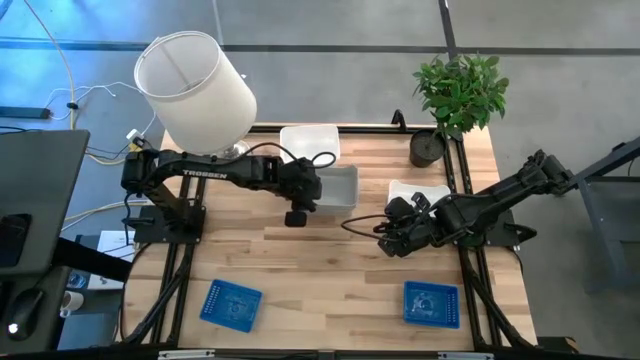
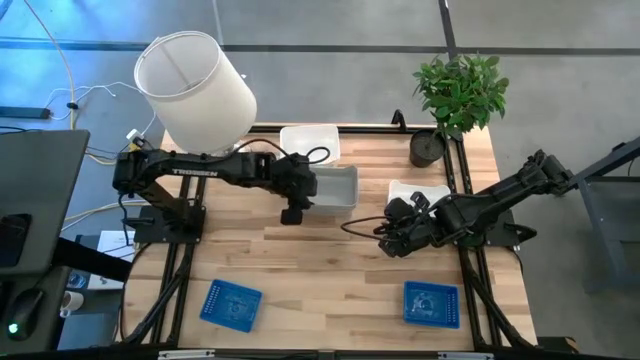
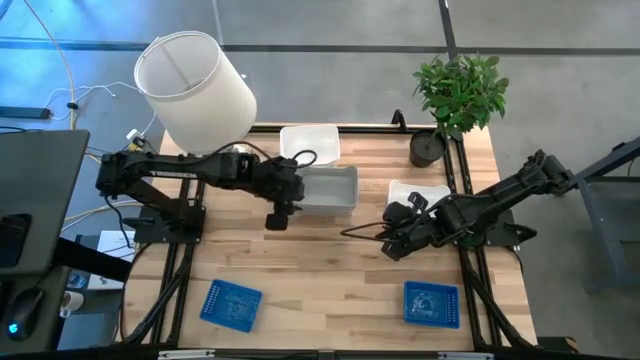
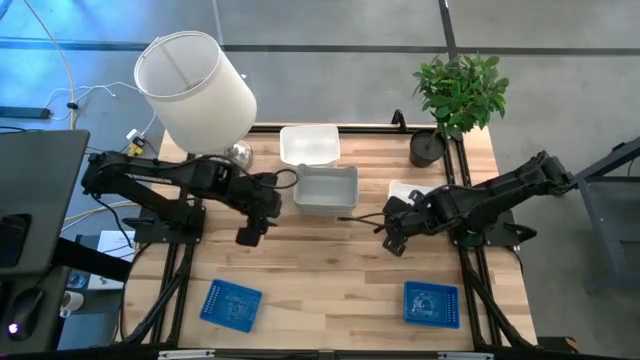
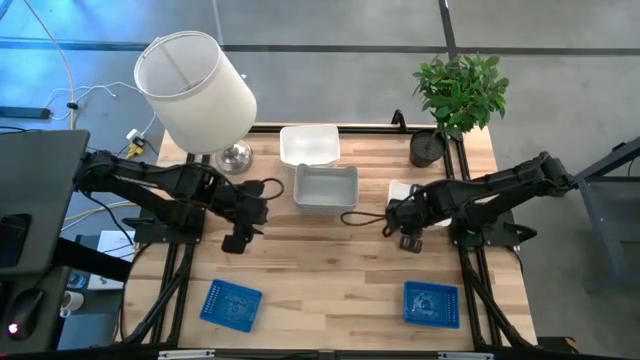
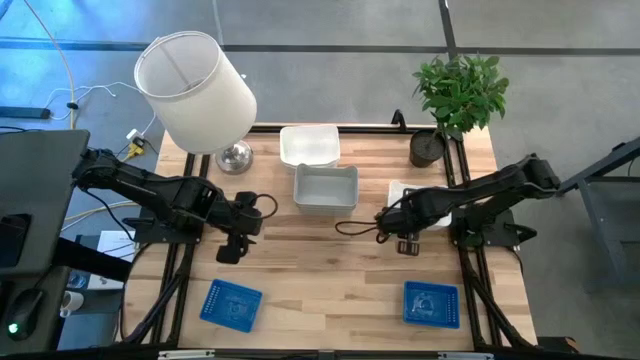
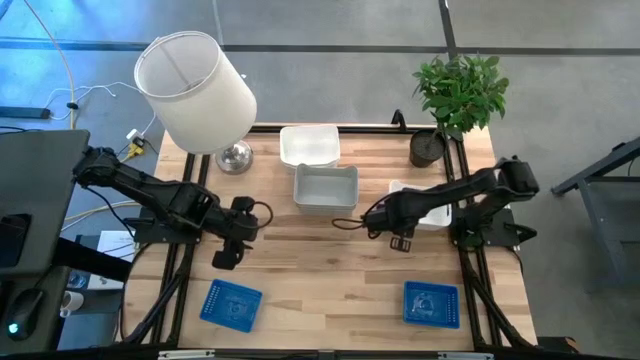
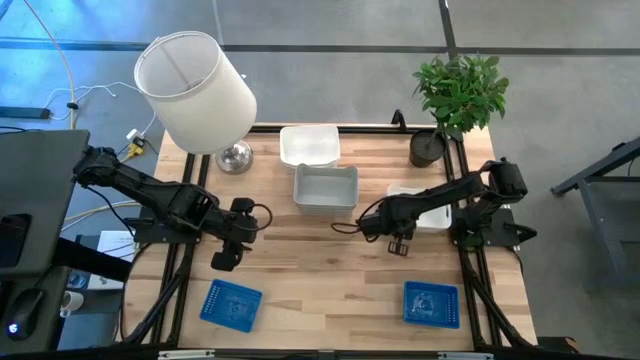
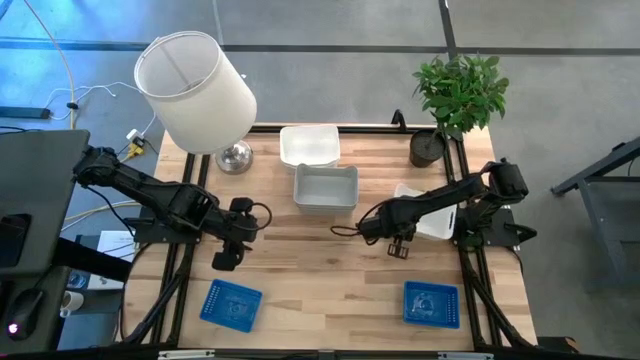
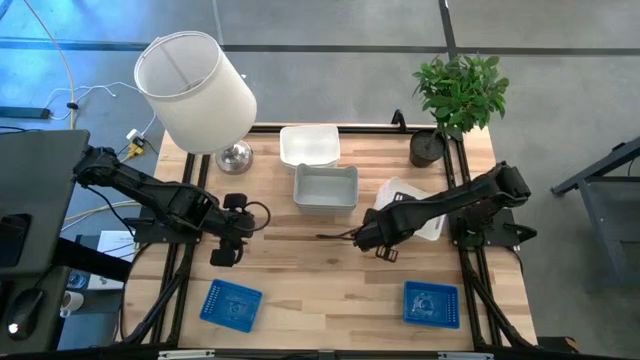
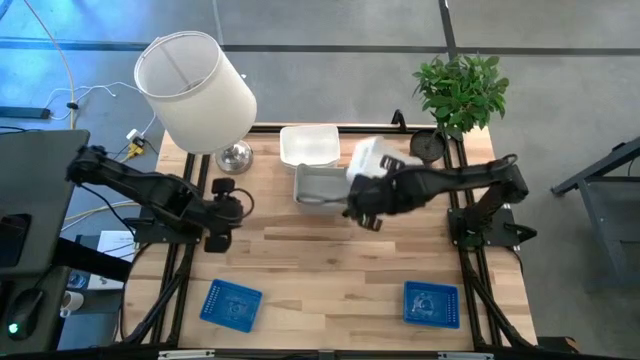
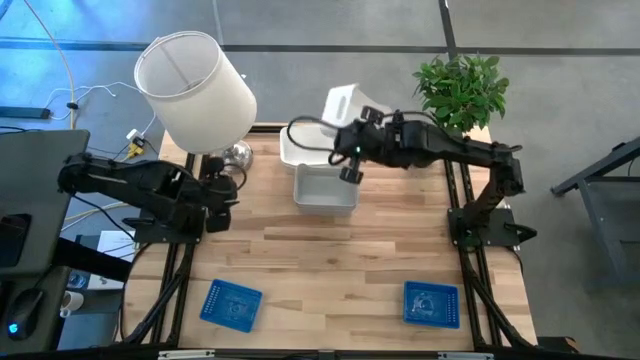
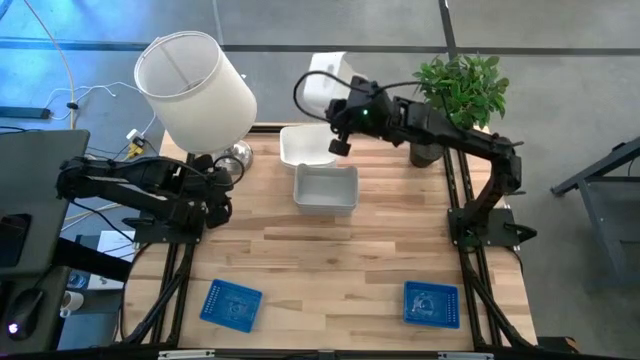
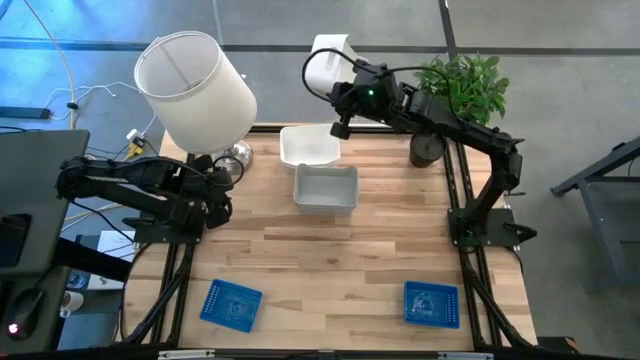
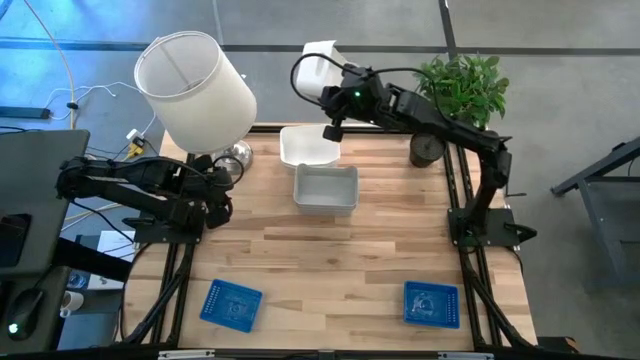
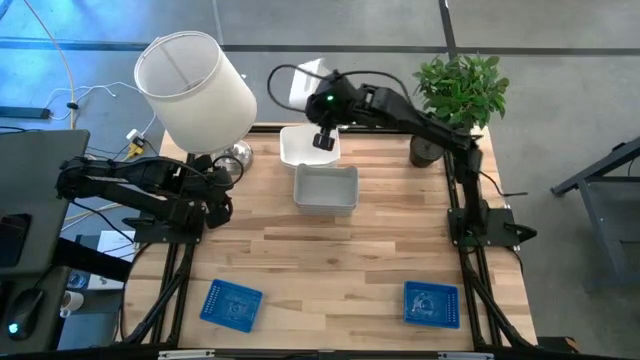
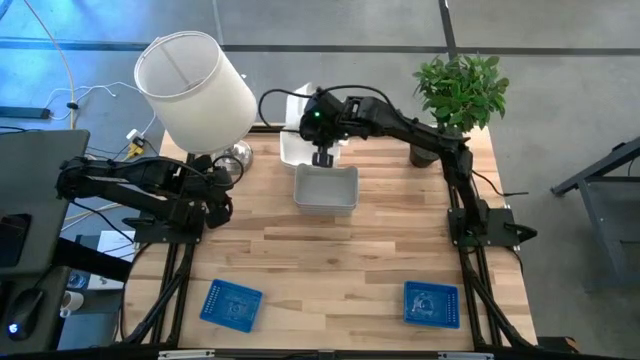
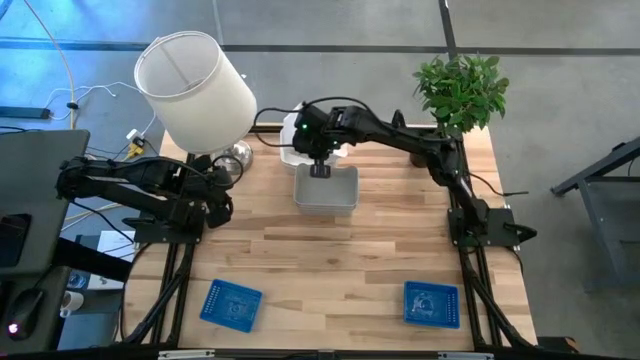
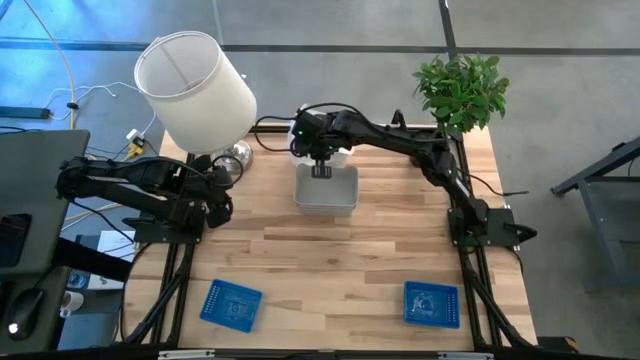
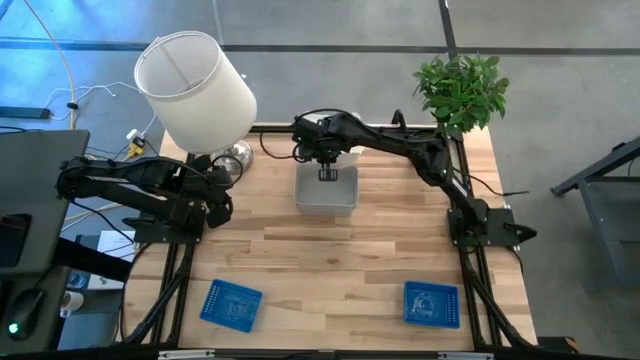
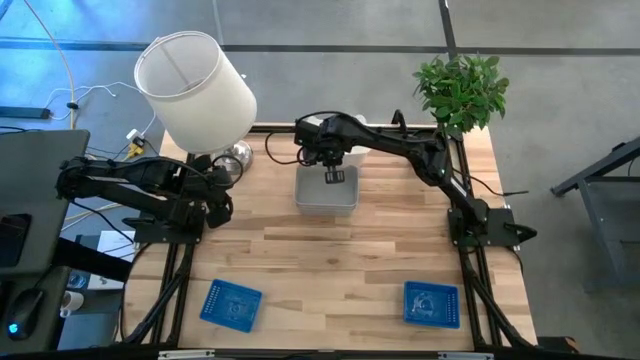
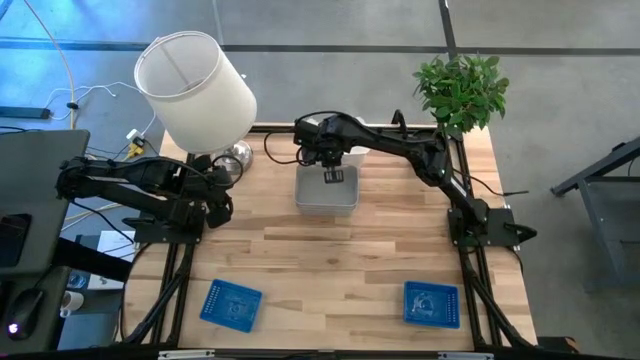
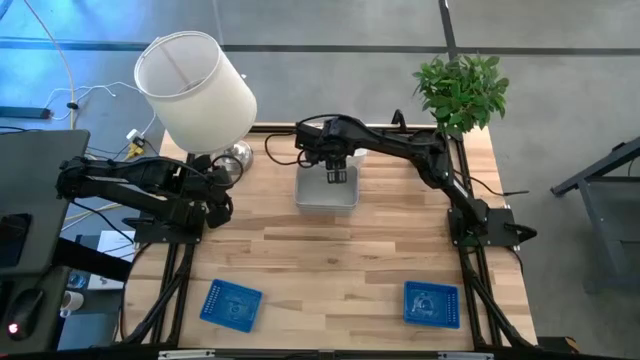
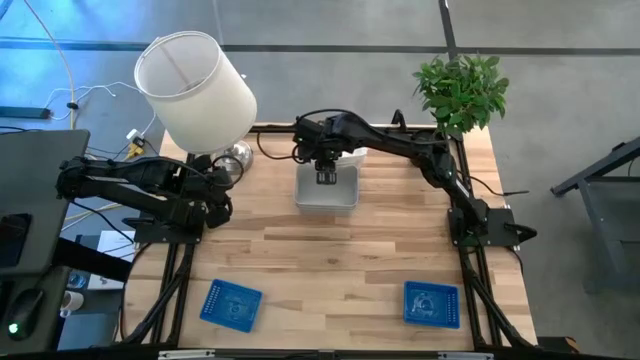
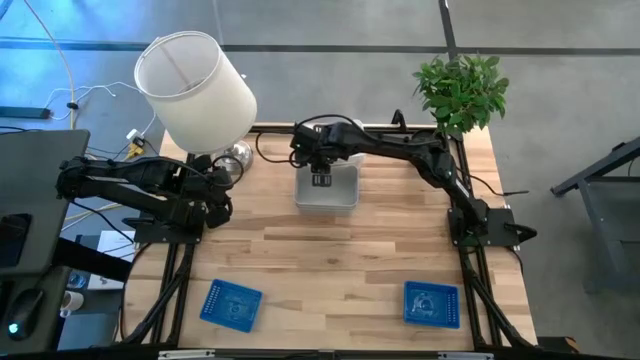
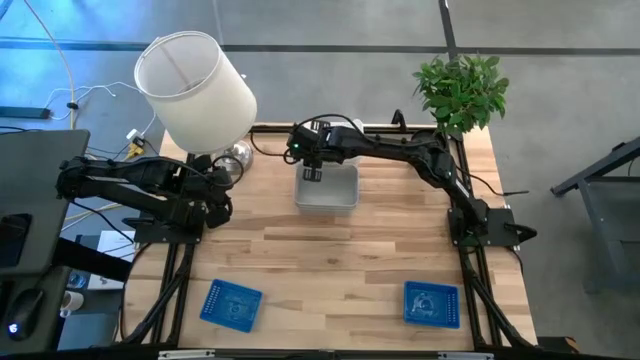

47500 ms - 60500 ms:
Stack the white bin on top of the top white bins

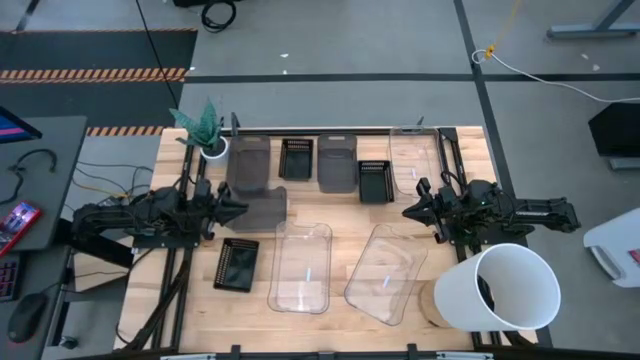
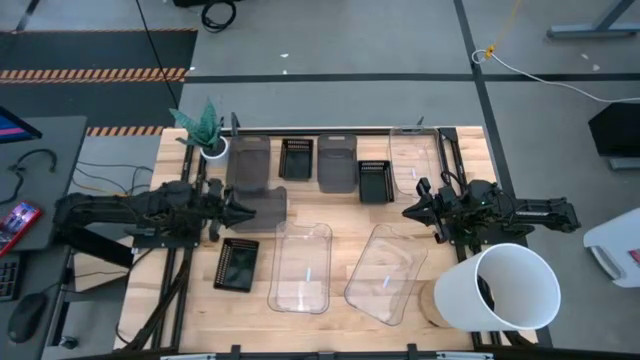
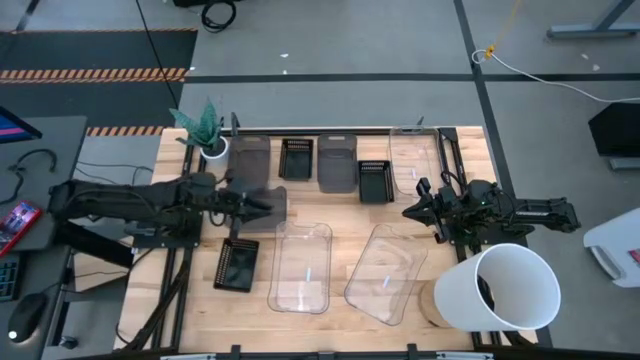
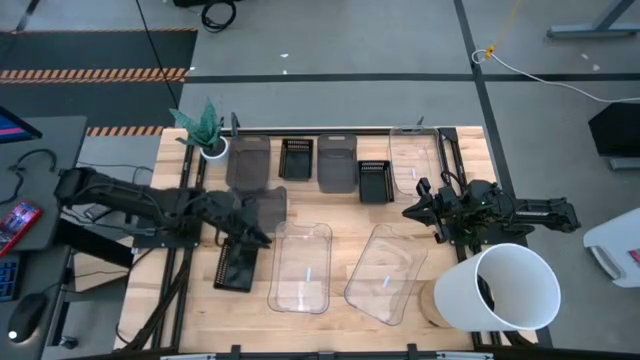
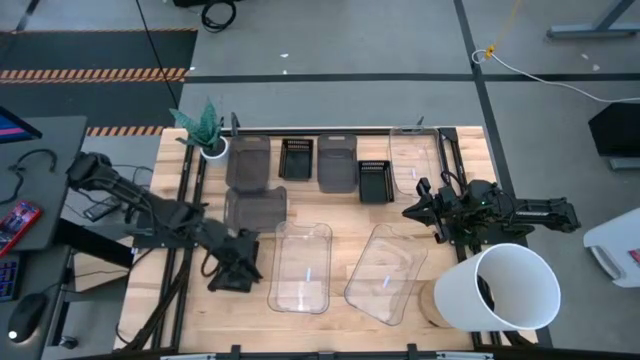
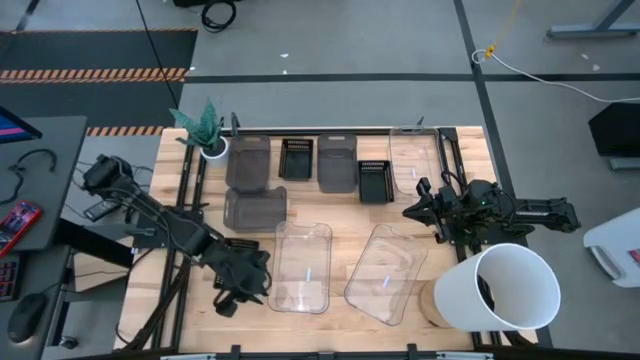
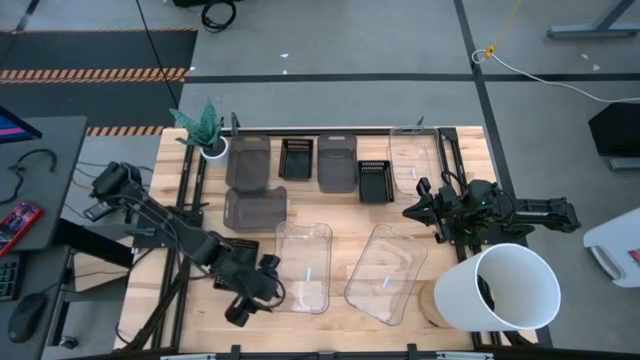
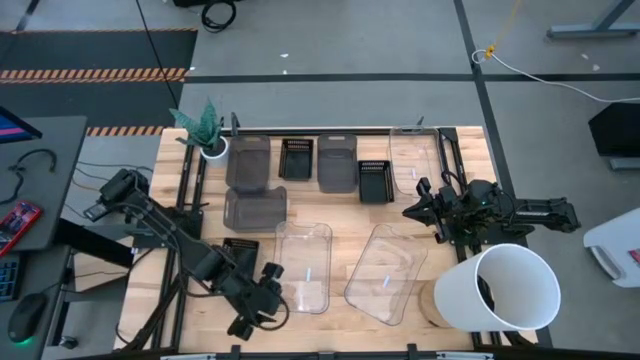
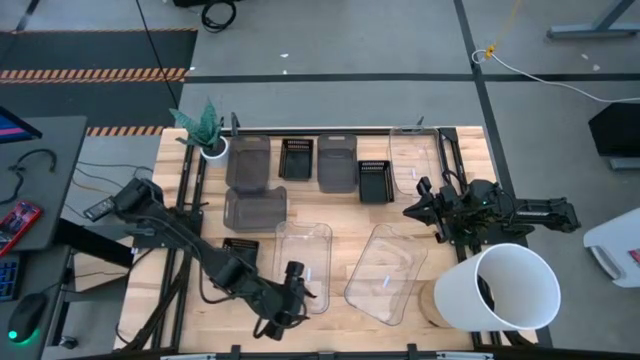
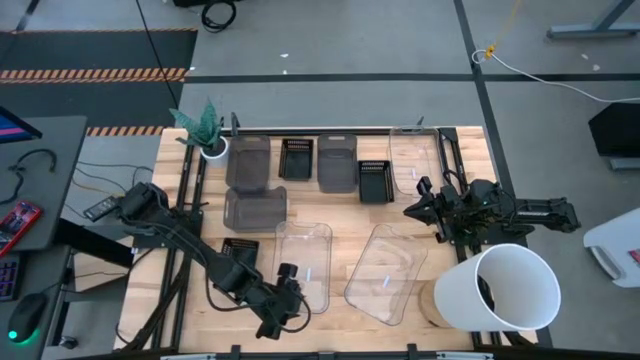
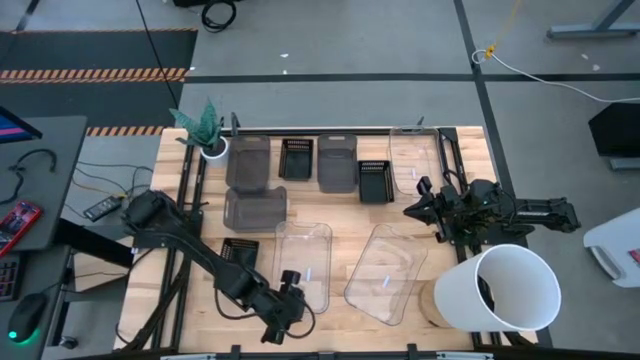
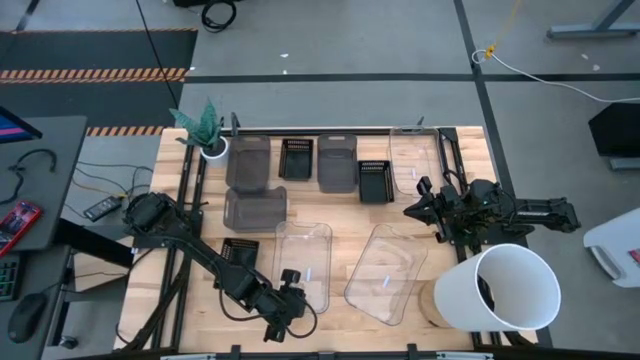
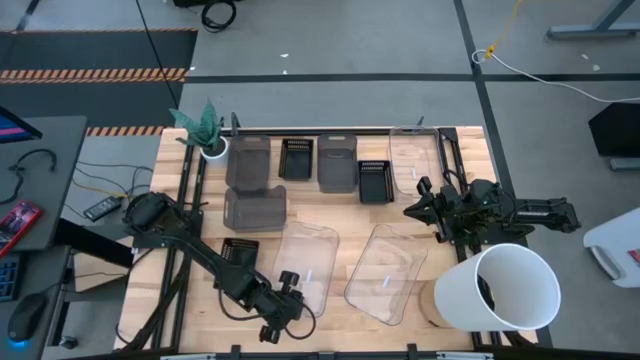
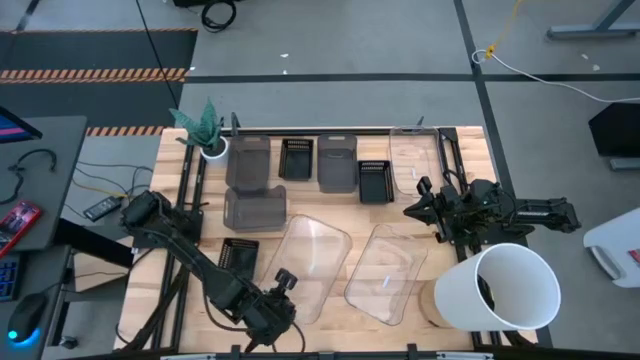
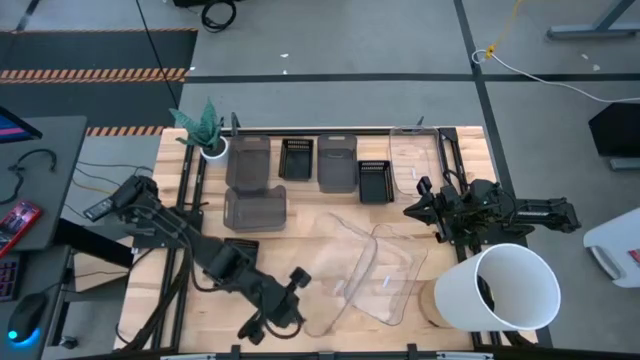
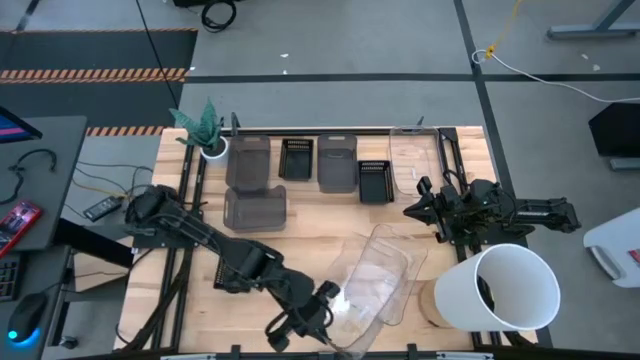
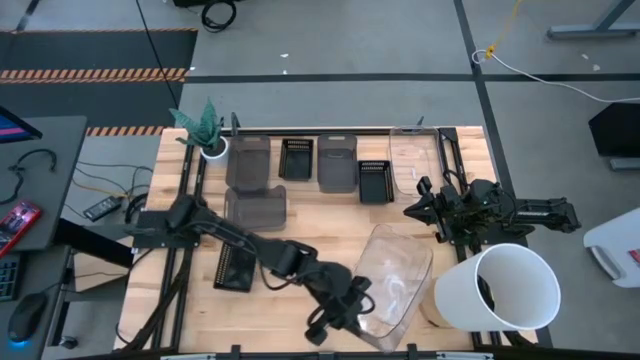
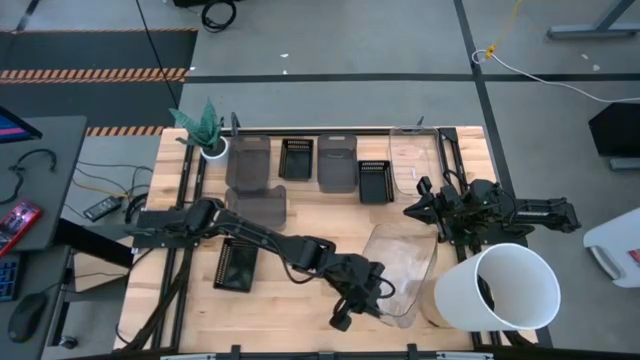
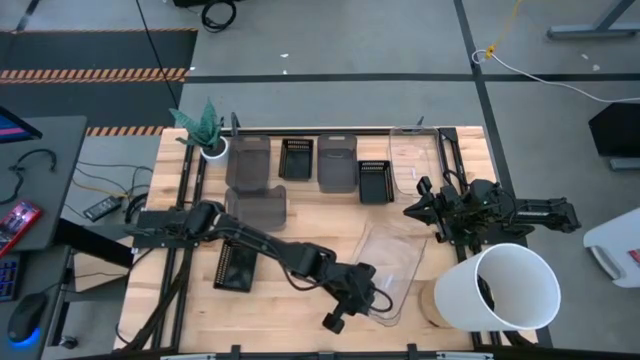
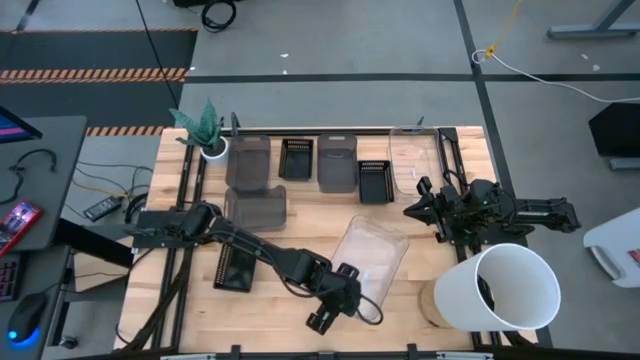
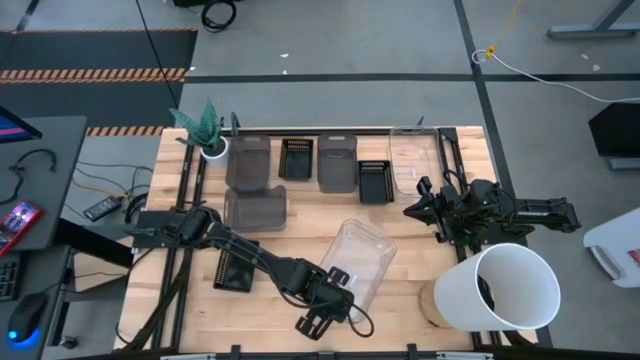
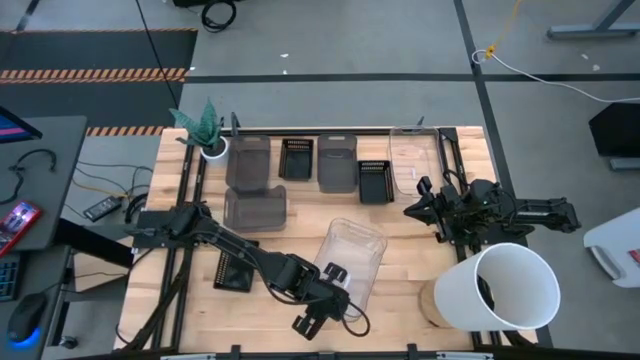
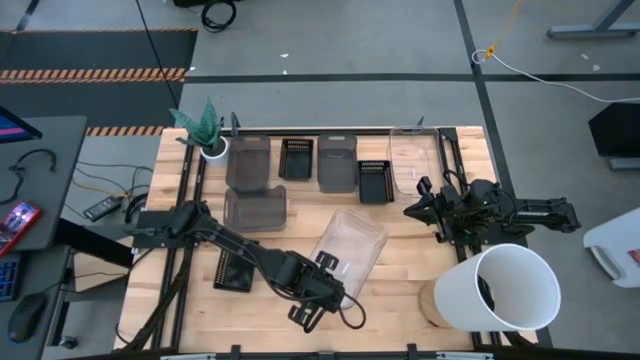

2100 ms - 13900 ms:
Stack the bottom left transparent bin on the bottom right transparent bin
